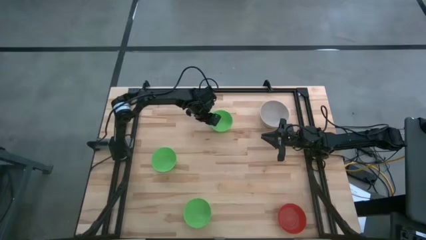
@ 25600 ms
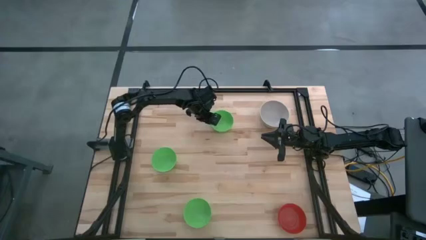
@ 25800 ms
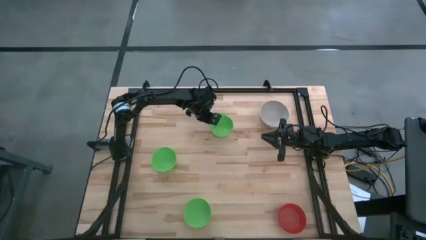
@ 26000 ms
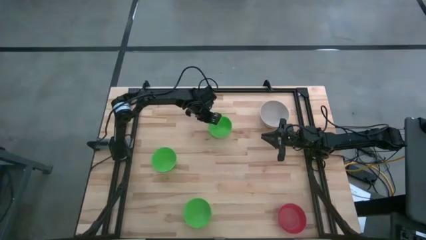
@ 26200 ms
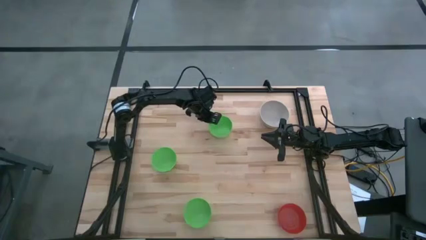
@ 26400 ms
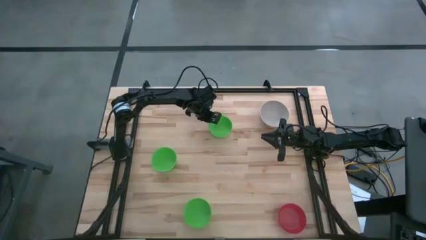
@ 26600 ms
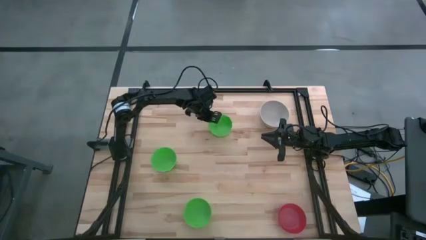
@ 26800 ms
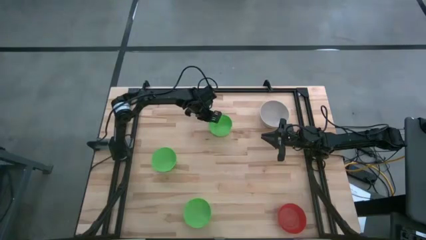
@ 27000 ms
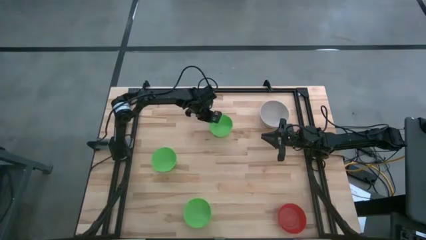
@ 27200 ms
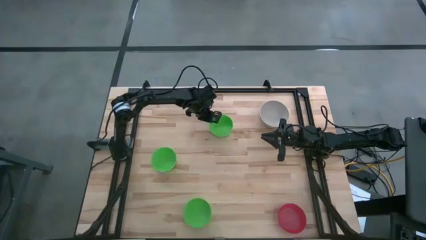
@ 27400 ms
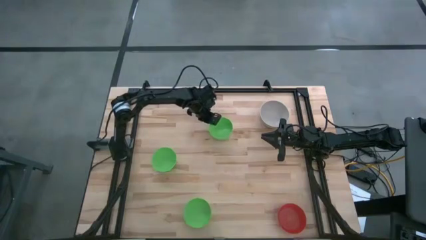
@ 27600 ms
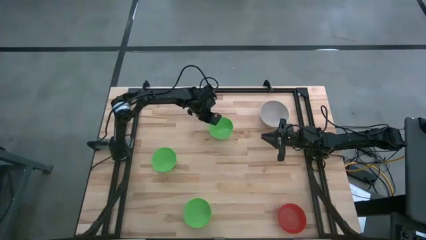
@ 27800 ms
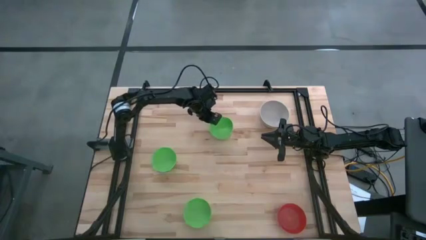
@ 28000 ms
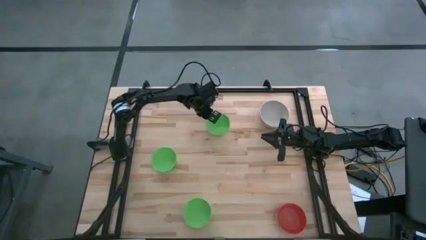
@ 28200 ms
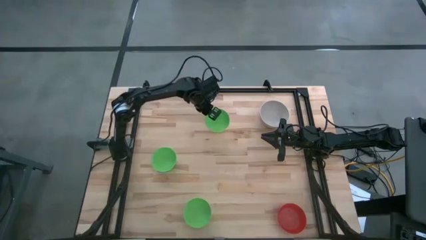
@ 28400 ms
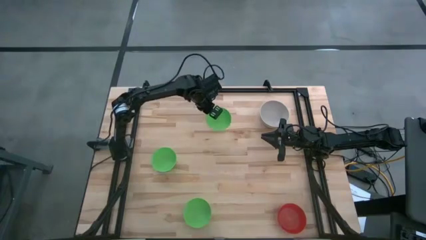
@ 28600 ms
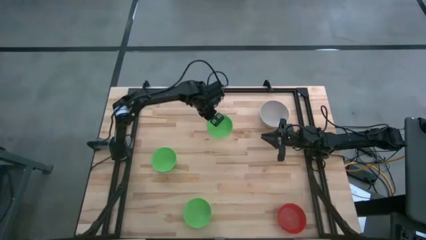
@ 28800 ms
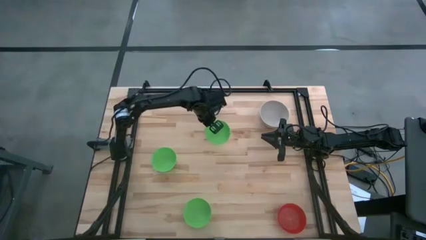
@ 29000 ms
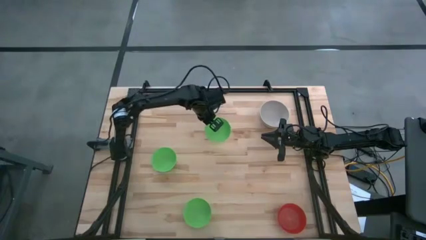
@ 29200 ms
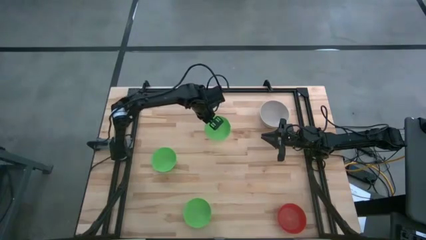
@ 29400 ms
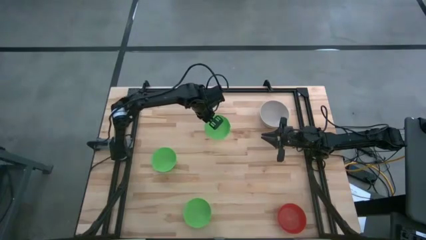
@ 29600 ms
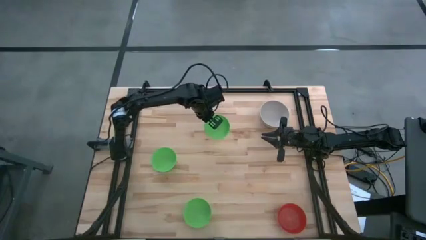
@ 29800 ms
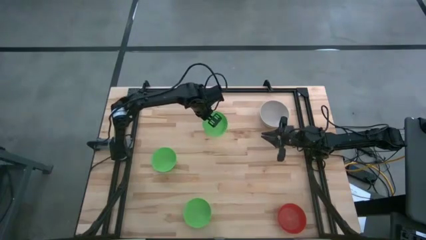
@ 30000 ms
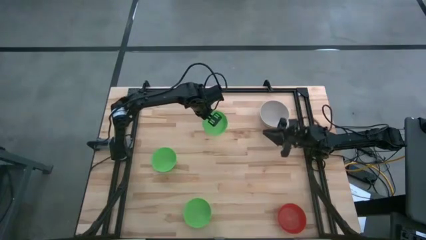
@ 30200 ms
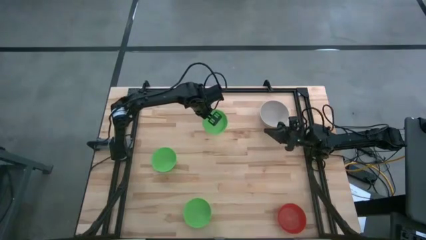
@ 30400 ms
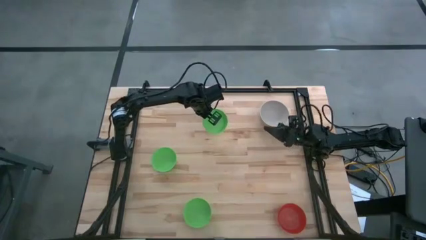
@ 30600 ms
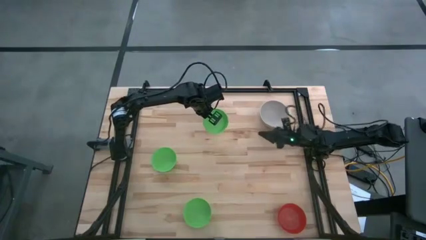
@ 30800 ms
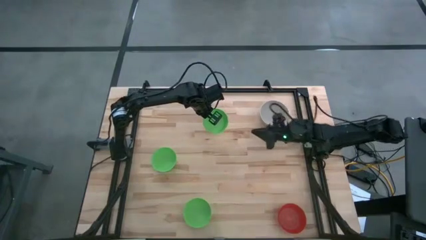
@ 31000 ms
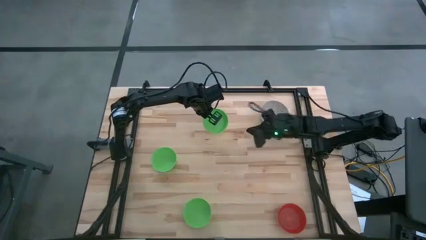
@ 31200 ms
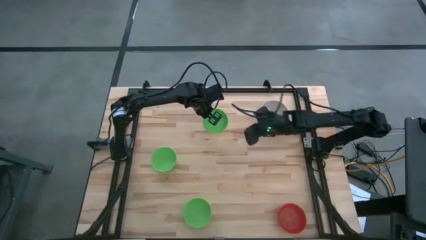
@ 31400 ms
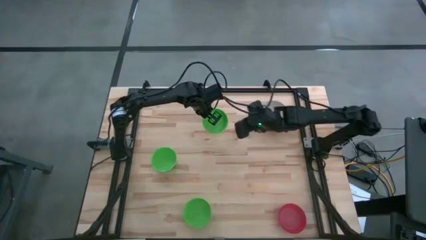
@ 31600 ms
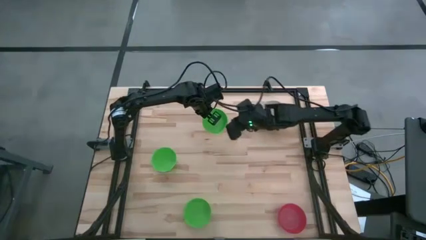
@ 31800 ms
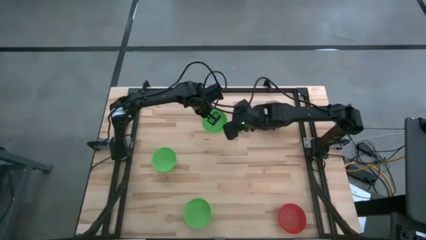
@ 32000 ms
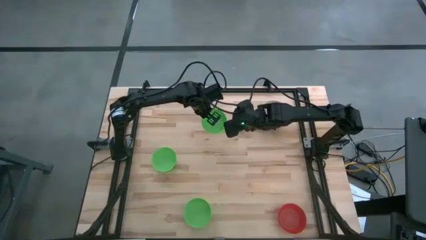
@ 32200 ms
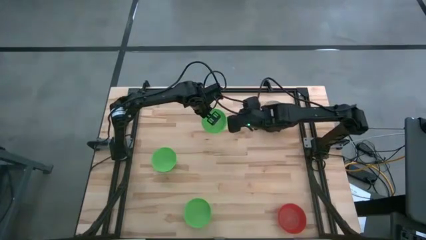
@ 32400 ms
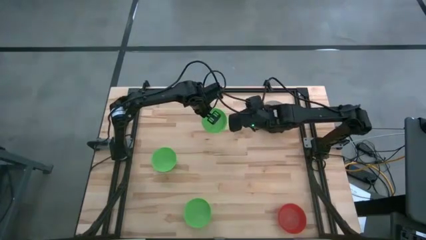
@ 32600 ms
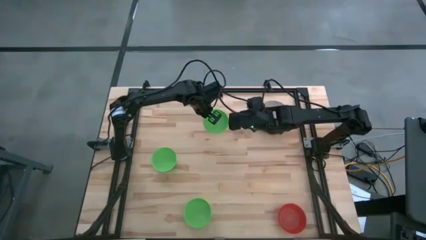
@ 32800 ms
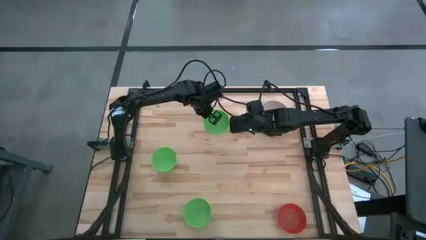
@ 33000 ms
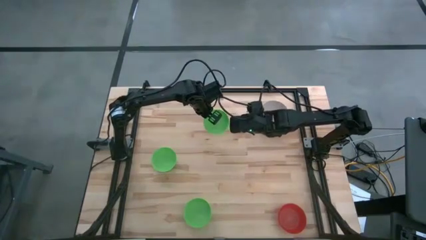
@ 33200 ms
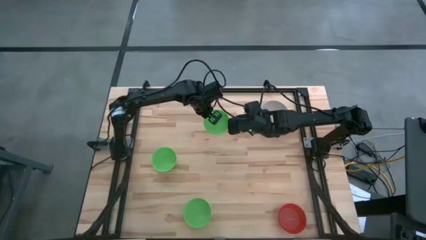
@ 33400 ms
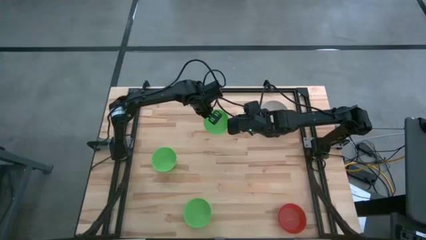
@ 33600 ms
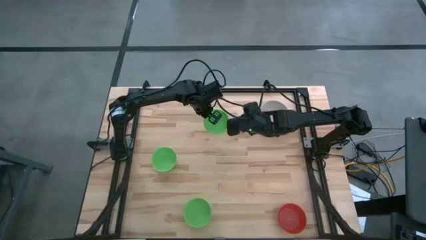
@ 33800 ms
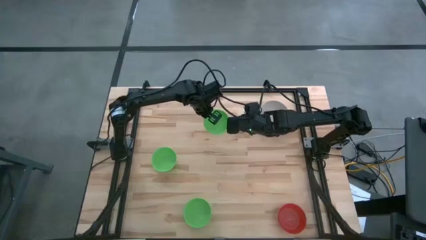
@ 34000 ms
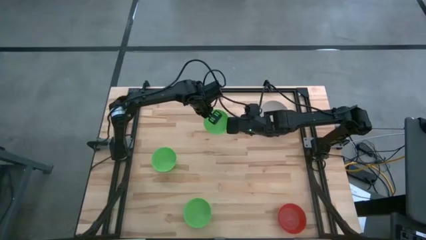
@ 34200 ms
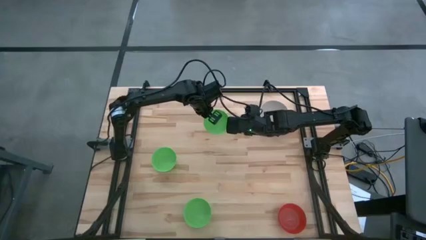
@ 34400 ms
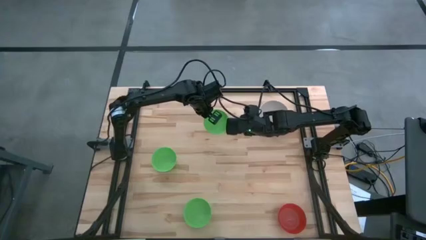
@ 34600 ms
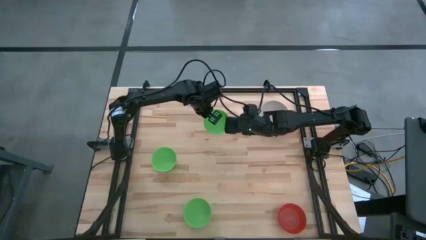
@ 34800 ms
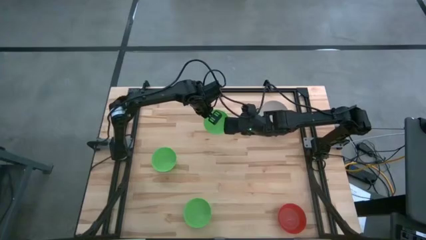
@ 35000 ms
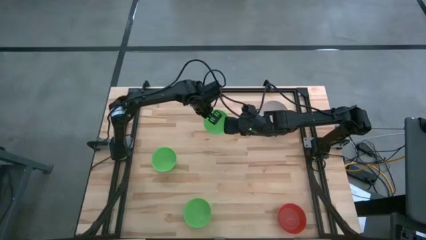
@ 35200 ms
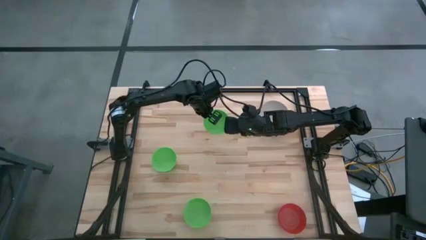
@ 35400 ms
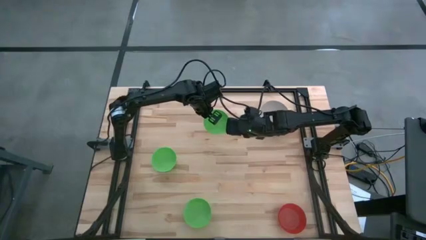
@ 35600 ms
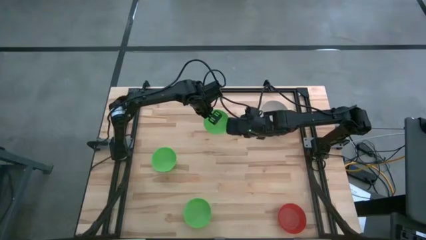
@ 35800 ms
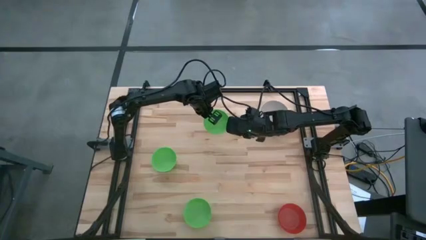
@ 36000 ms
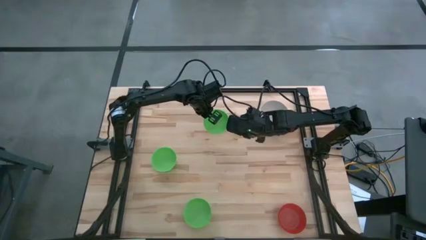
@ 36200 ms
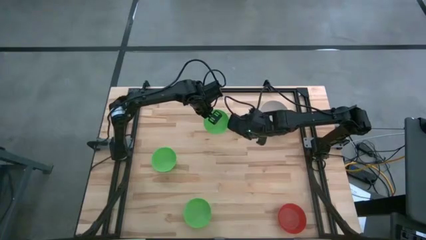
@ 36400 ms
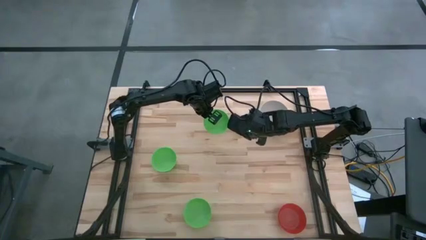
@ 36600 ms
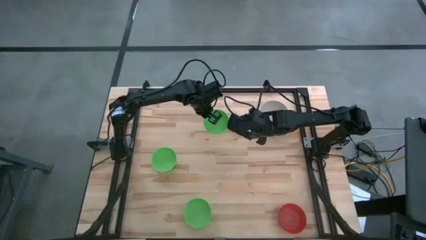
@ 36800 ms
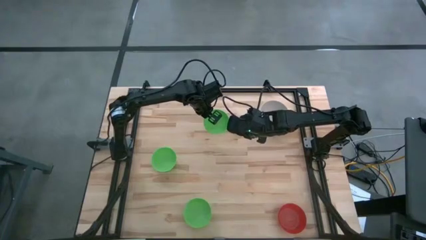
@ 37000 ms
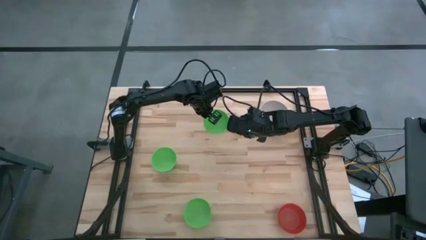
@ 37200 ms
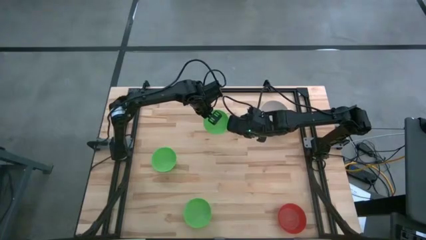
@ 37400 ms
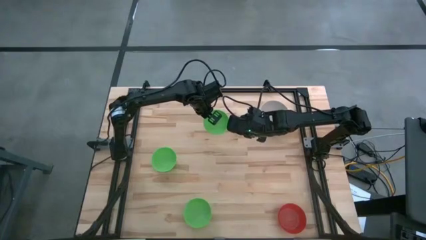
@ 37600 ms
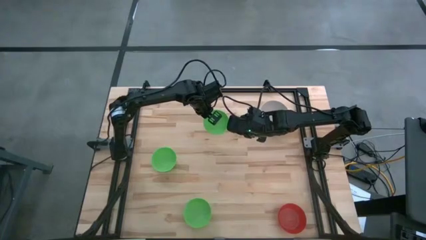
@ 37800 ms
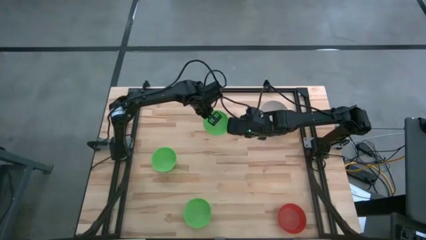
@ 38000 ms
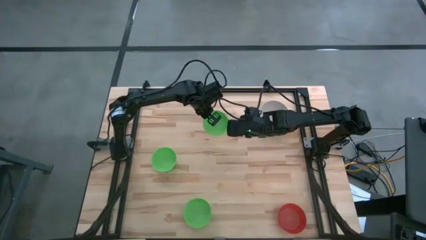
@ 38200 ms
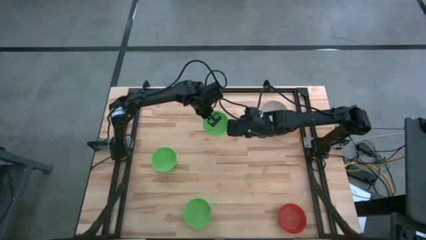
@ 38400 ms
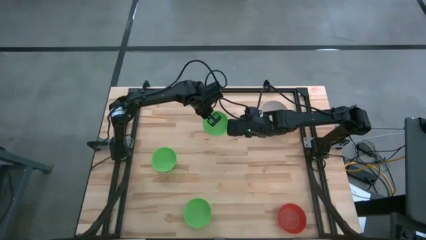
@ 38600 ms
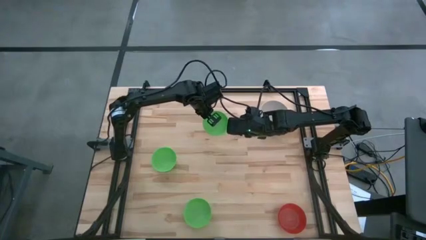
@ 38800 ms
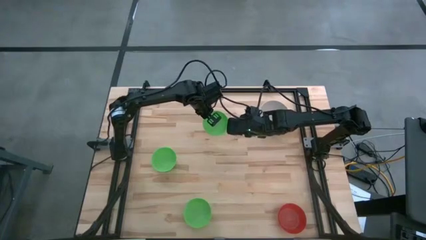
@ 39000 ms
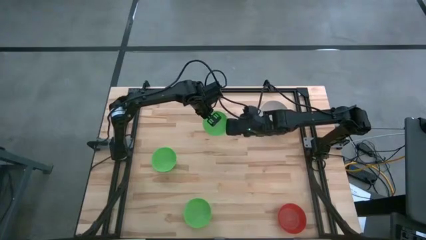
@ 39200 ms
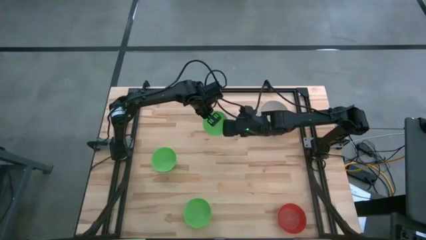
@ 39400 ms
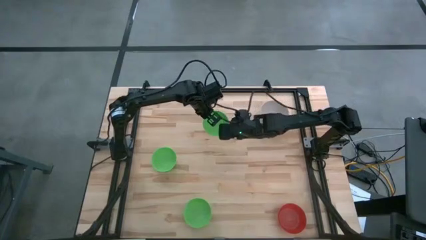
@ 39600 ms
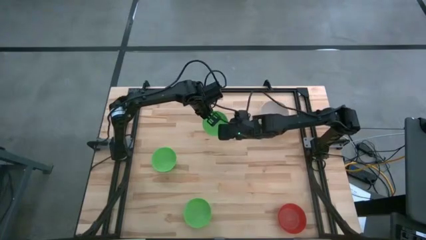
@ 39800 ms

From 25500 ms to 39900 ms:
Stack the top right green bowl on top of the gray bowl
